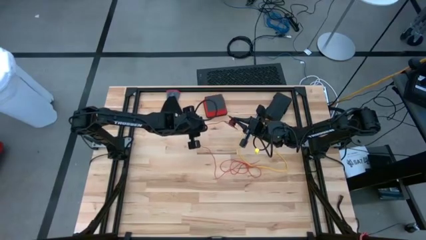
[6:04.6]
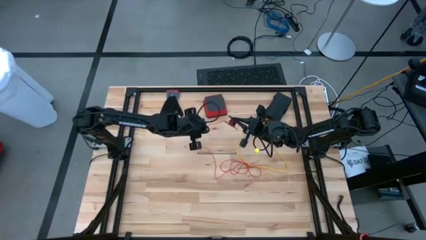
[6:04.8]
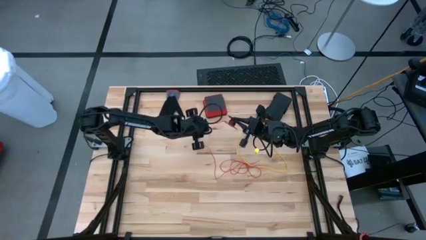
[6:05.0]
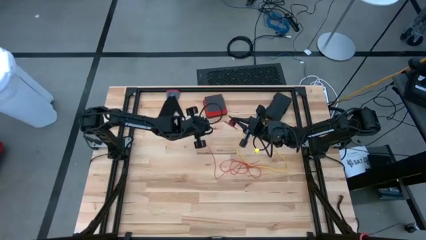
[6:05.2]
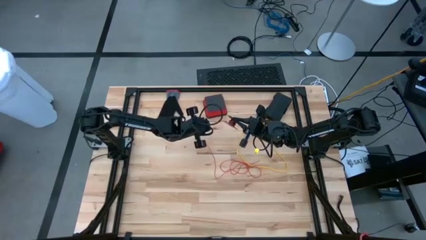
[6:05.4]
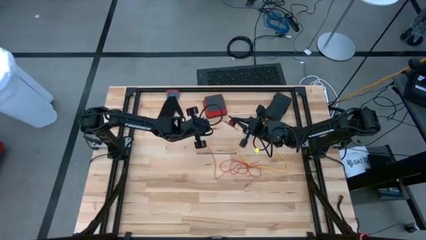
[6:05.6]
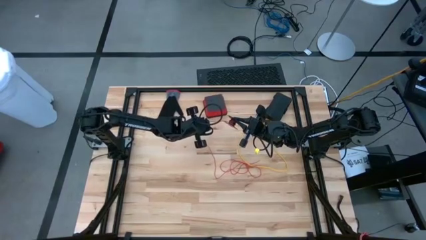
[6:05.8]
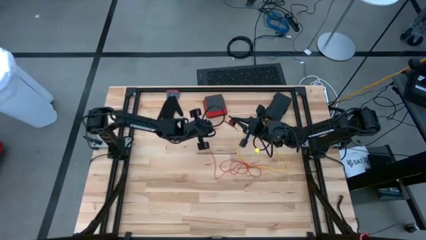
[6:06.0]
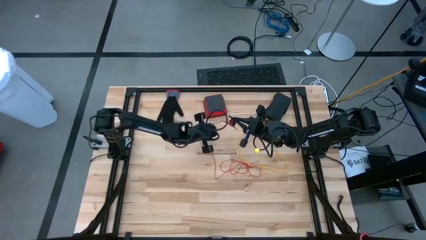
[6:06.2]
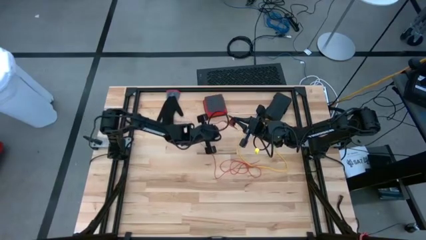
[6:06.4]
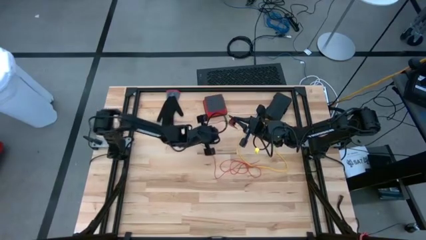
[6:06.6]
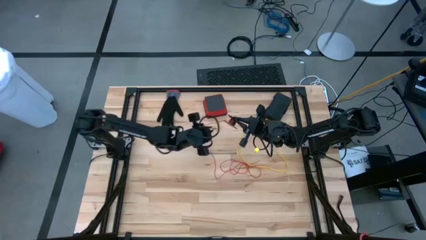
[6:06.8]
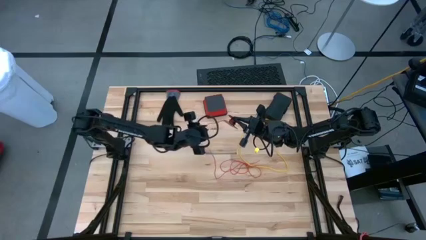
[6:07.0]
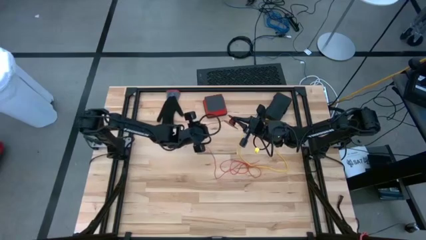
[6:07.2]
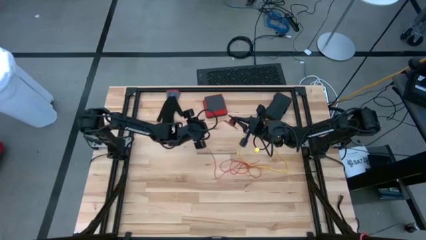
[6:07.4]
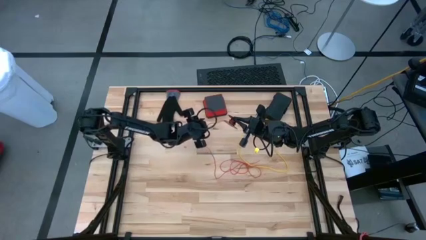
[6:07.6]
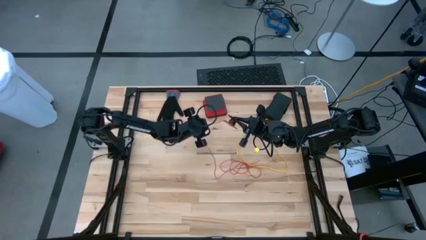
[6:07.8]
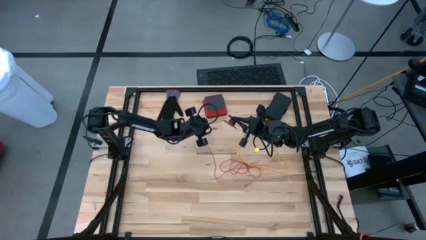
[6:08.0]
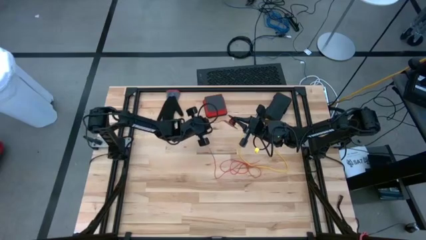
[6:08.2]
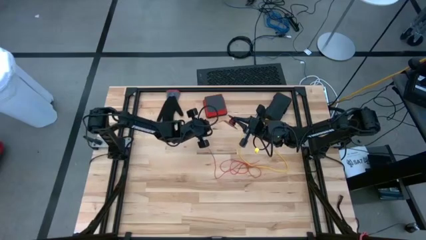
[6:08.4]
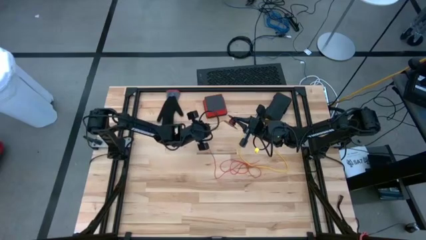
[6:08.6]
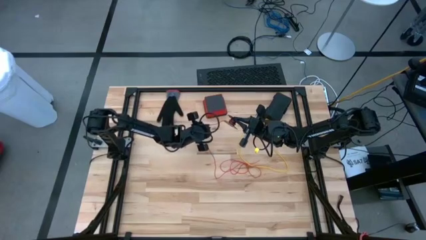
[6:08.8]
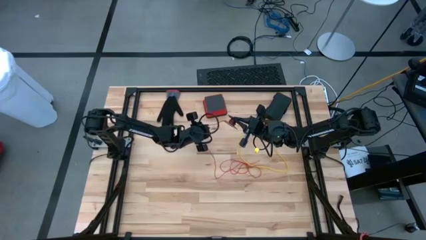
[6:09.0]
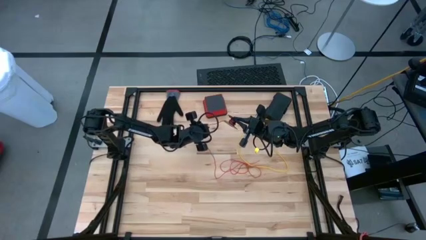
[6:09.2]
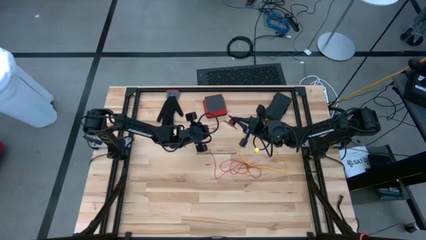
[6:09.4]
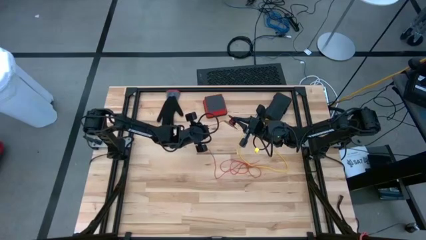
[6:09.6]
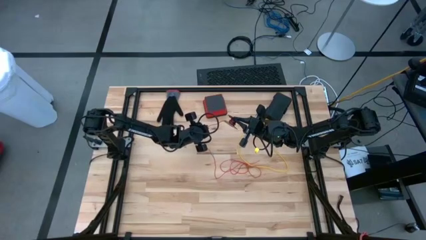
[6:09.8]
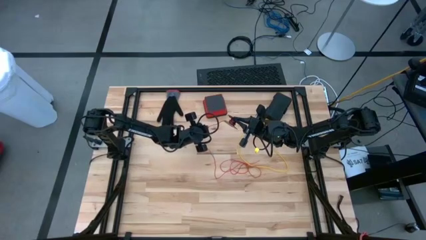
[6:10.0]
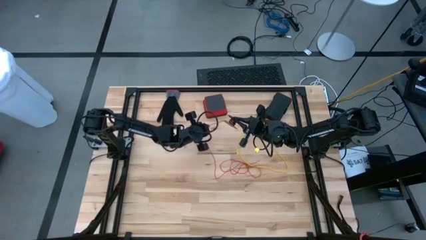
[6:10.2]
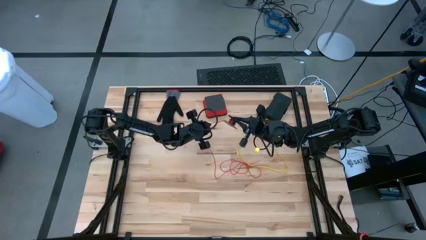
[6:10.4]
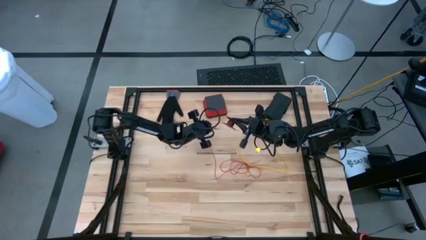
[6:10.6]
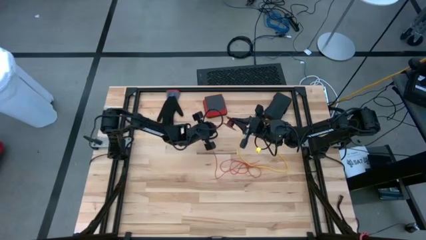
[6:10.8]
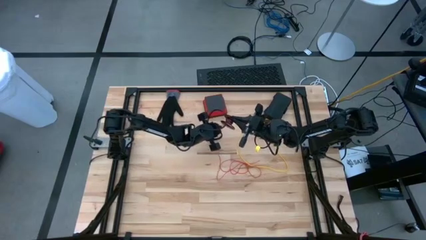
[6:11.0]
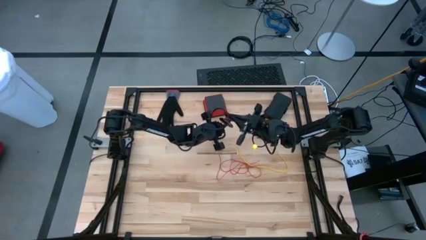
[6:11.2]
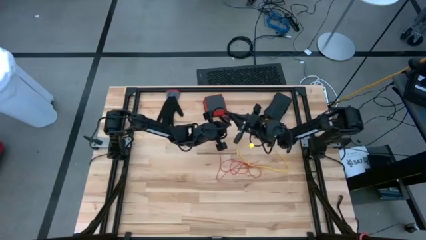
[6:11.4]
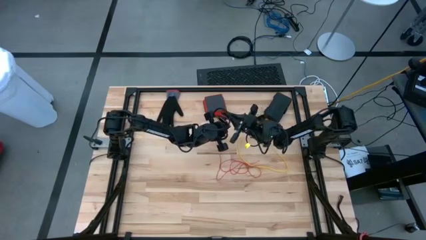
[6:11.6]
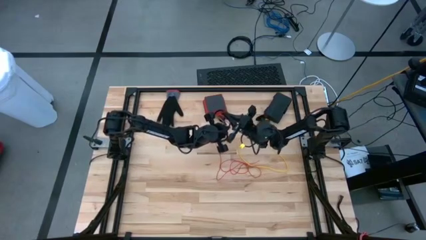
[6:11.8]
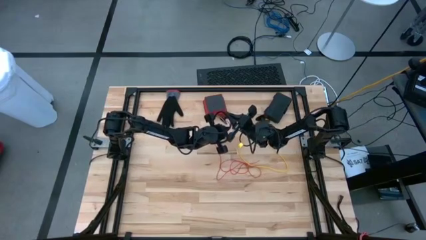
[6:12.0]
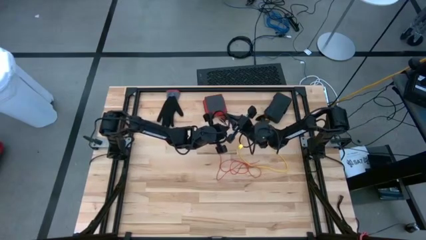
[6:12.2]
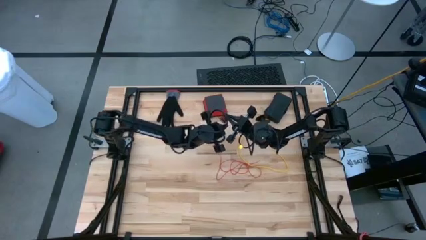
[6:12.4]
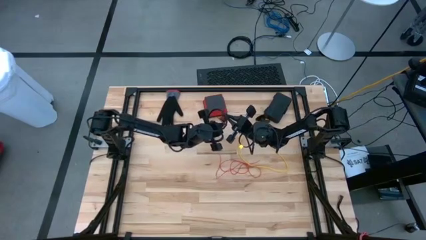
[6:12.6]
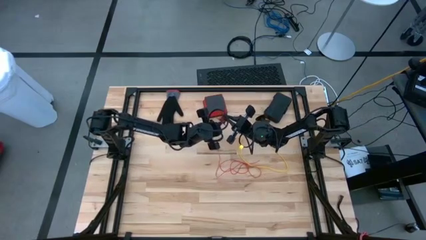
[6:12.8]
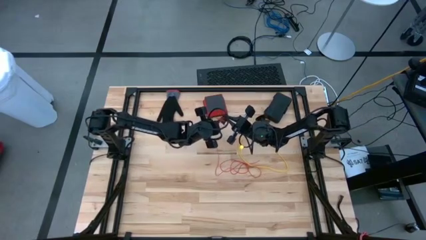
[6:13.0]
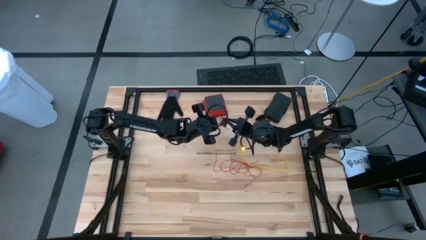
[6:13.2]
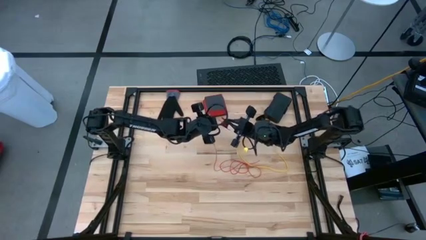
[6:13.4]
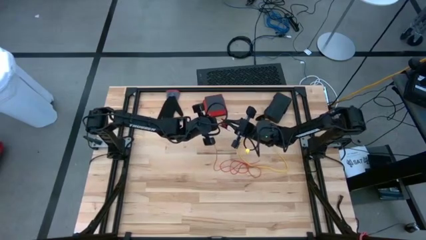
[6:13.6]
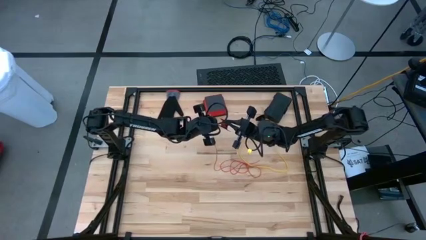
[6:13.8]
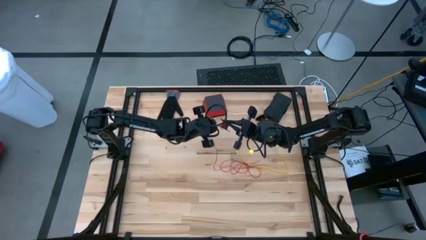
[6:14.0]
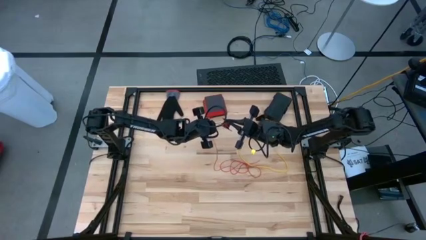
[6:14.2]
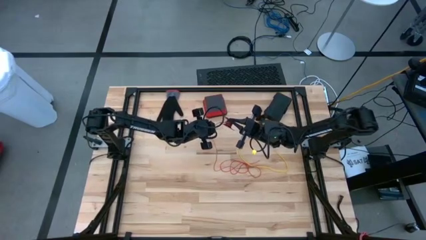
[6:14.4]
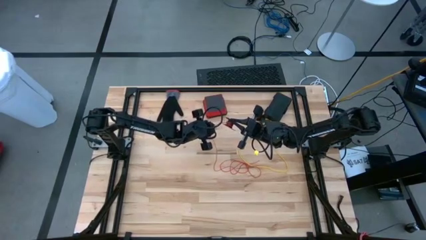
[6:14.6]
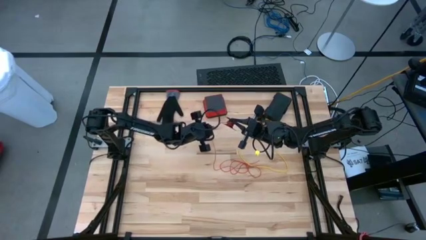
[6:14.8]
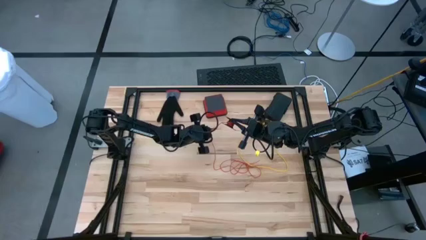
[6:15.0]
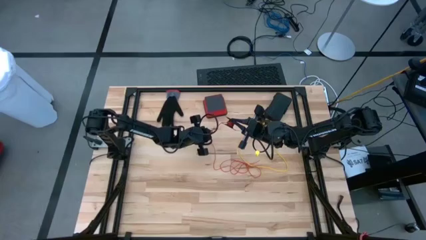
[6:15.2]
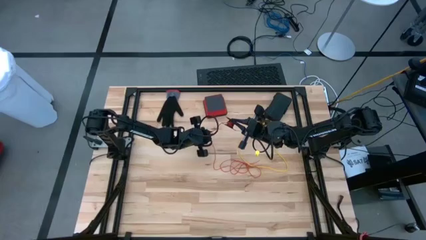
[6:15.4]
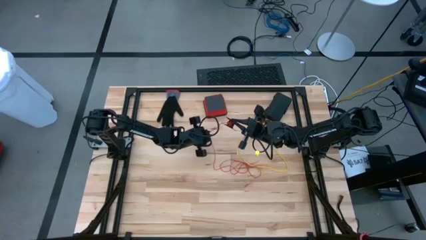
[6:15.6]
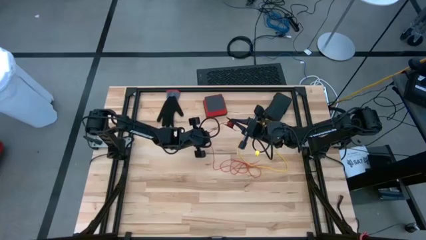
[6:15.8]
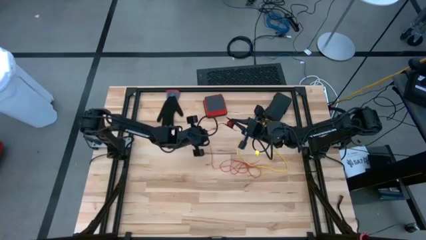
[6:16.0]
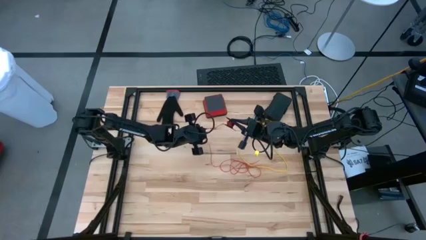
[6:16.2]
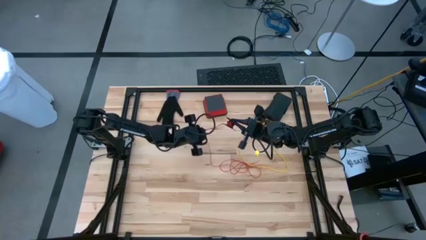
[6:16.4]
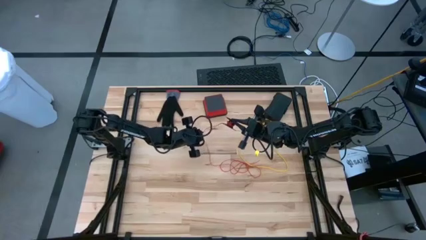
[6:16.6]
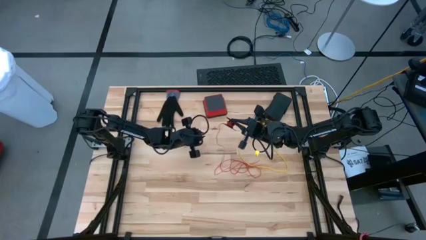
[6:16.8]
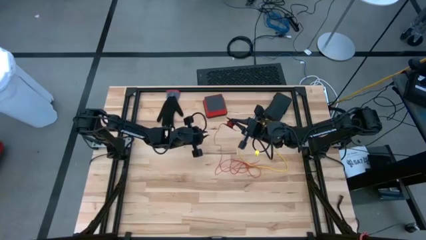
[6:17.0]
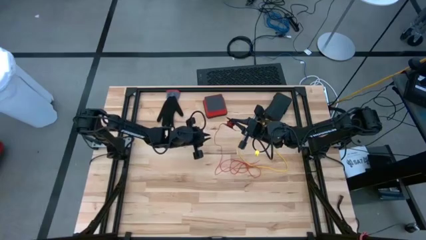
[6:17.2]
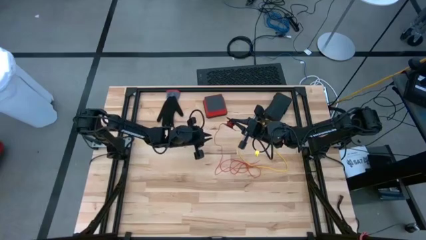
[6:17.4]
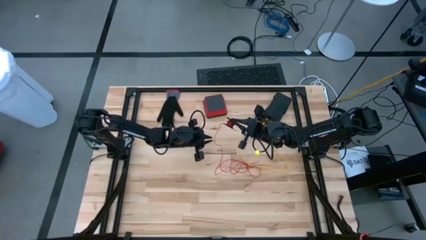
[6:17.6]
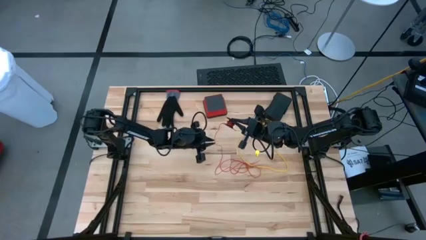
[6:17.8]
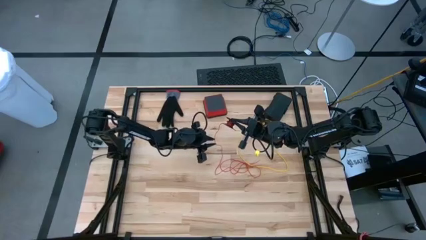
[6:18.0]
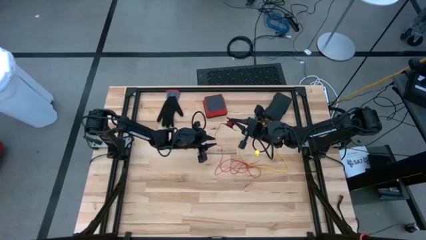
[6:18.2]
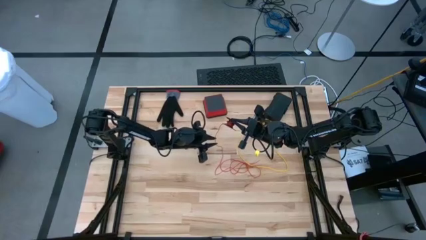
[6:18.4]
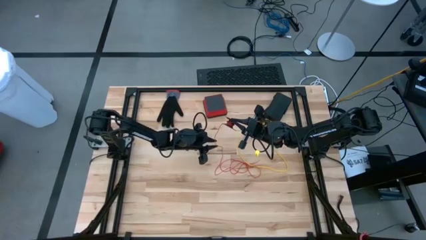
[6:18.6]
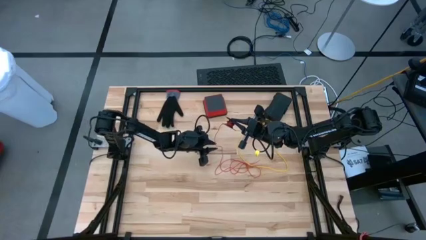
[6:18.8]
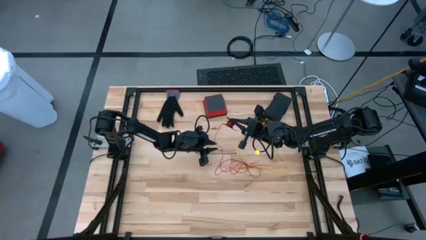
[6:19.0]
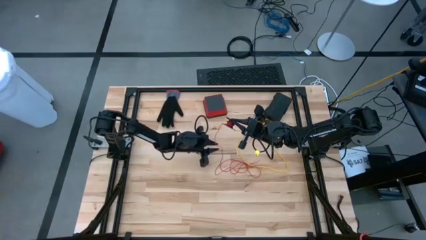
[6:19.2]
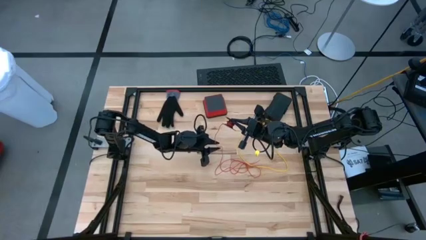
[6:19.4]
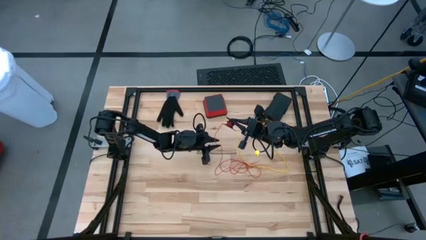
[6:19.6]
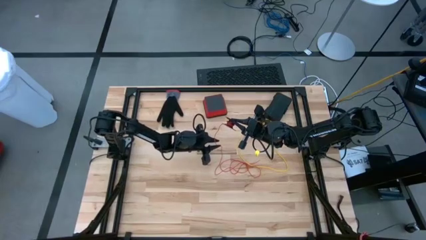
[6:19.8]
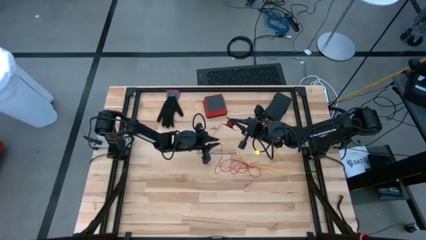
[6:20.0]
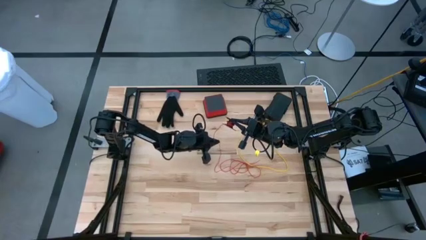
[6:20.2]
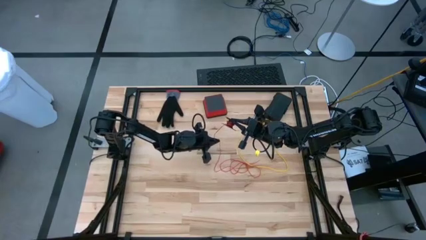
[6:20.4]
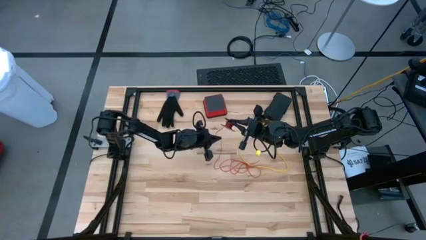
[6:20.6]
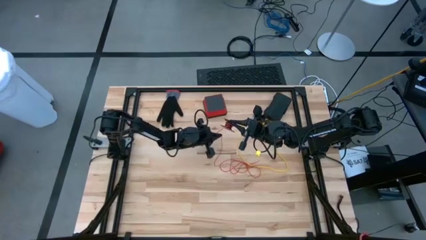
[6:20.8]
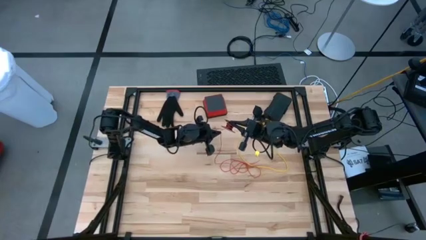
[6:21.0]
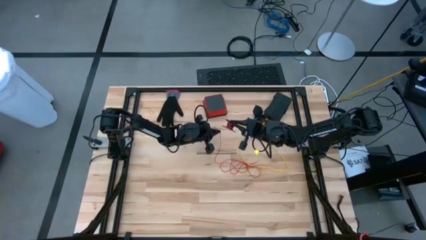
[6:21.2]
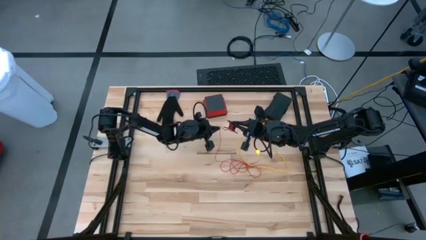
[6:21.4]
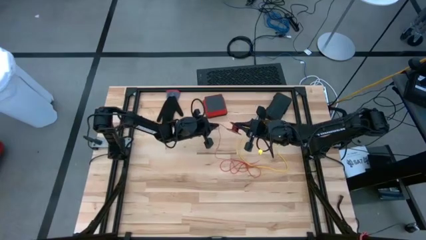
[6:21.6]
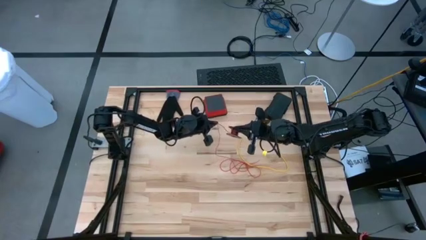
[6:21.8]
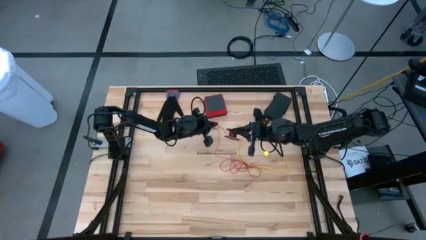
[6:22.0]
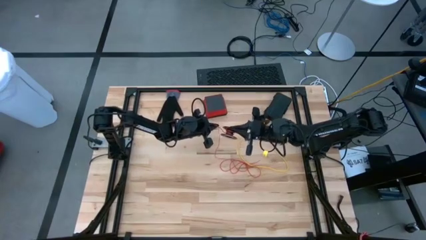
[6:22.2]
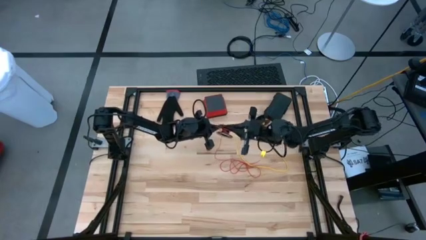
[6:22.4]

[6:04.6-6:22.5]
Task: Coil cords
Coil the red wire onto the spool
